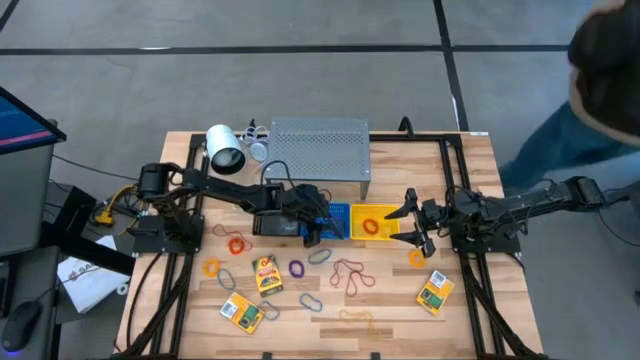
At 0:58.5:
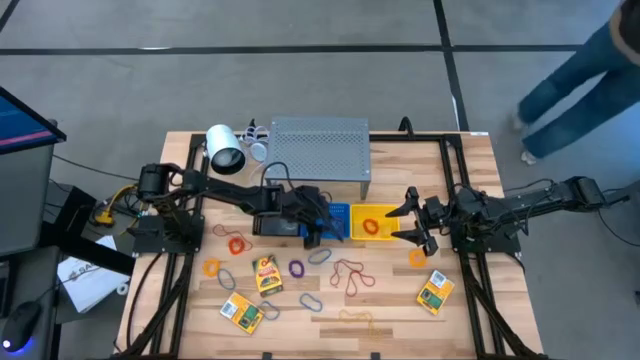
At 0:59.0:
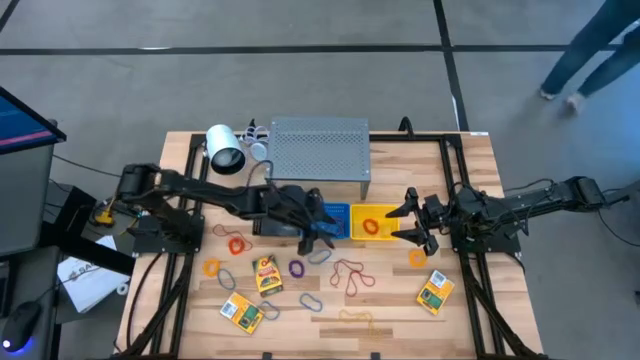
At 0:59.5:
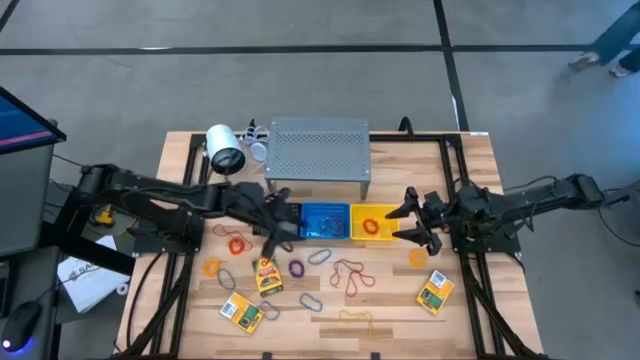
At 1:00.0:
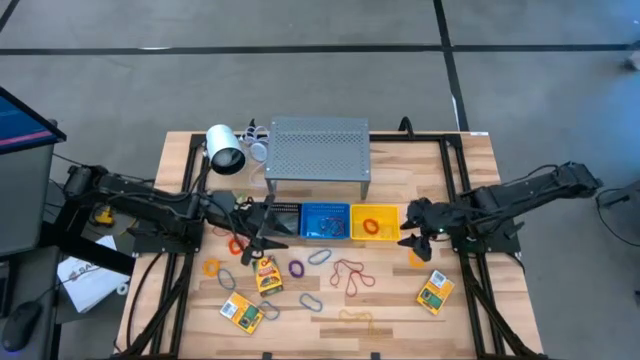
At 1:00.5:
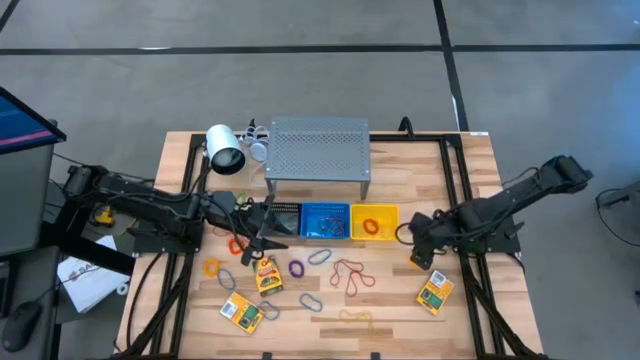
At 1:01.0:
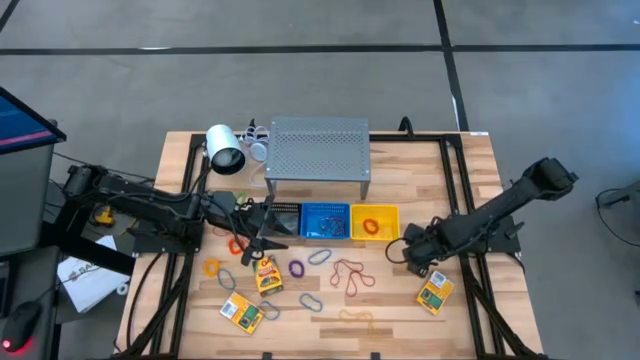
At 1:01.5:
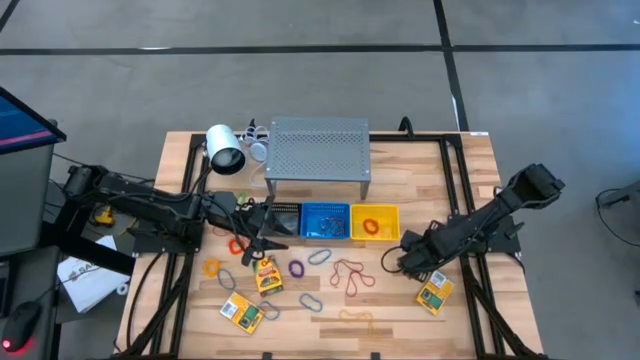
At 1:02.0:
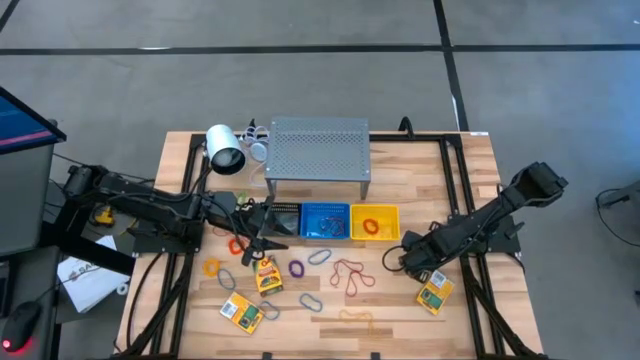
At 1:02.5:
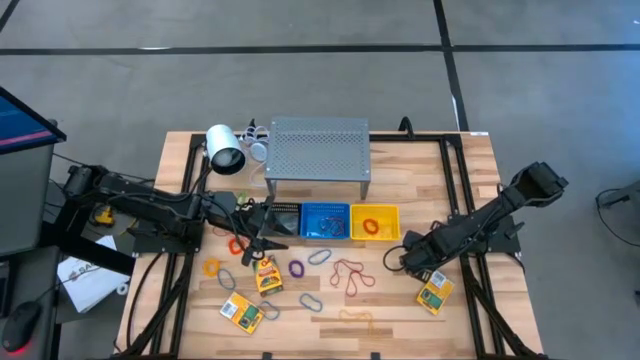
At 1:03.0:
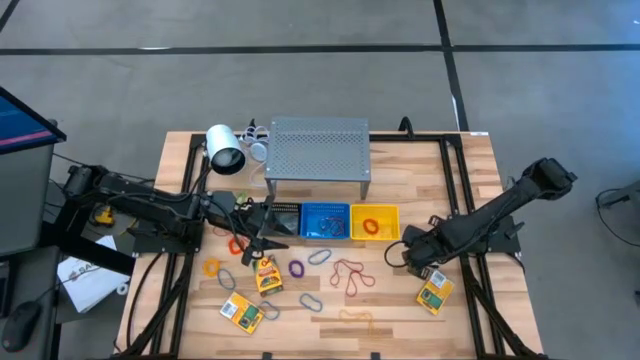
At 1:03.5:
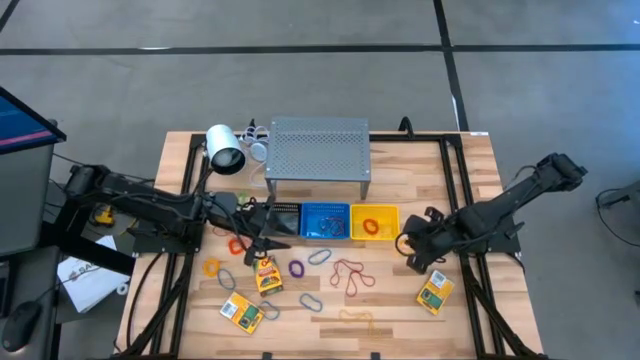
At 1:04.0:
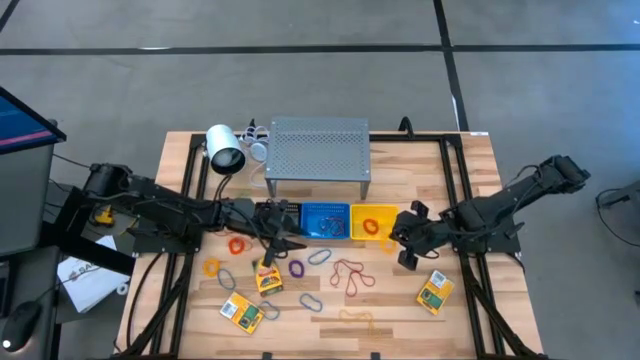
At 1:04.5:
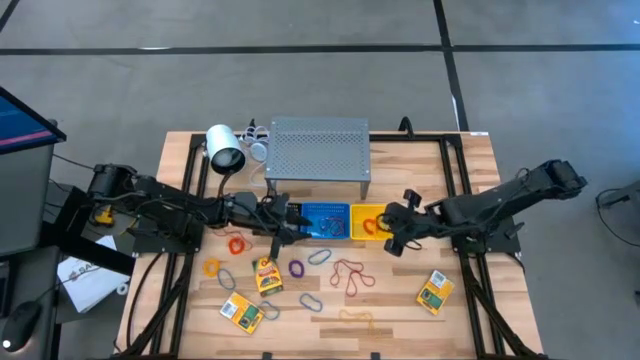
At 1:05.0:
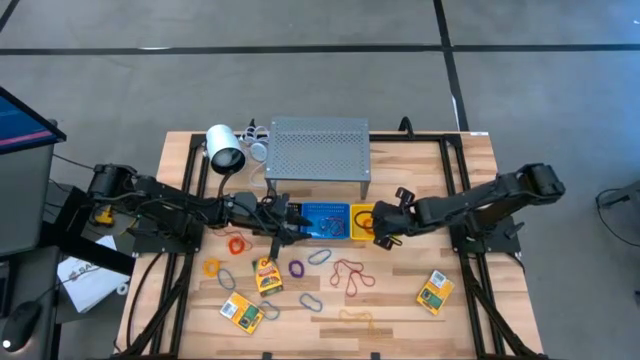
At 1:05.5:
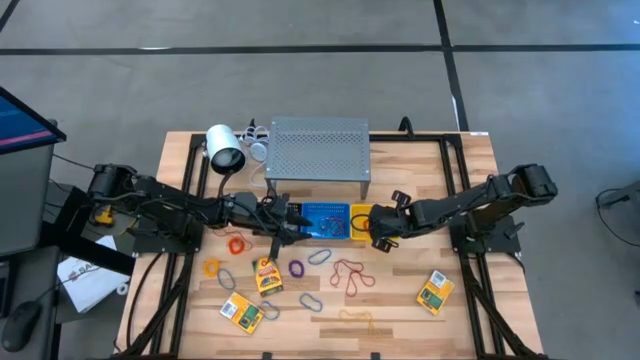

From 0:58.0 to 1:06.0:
Task: Pick & Place Office Desk Supplies
Put the right yellow spiral keychain into the yellow bin

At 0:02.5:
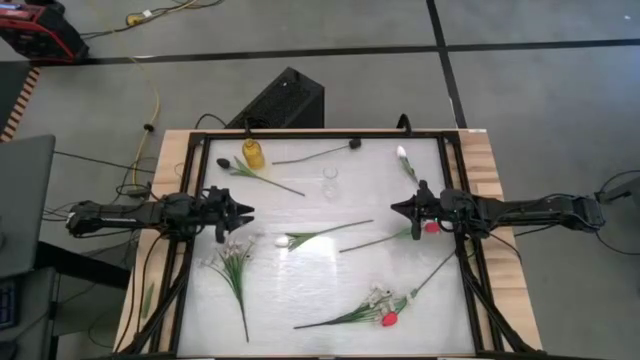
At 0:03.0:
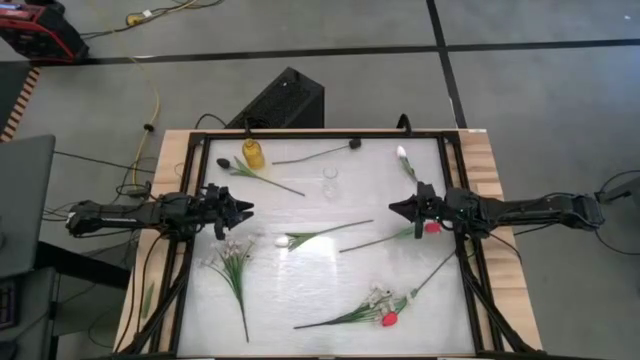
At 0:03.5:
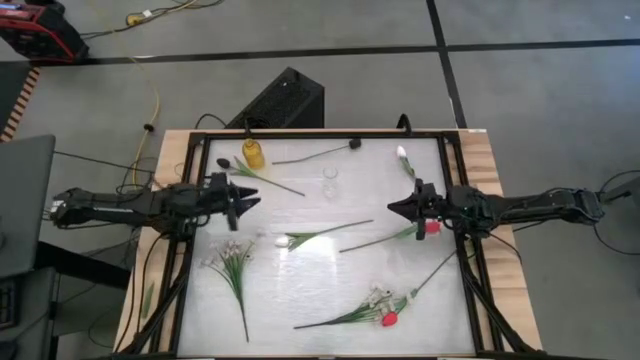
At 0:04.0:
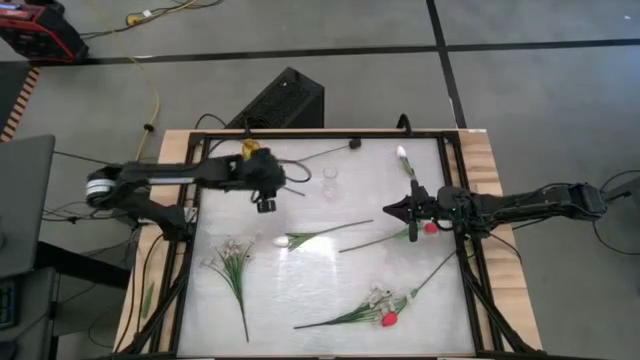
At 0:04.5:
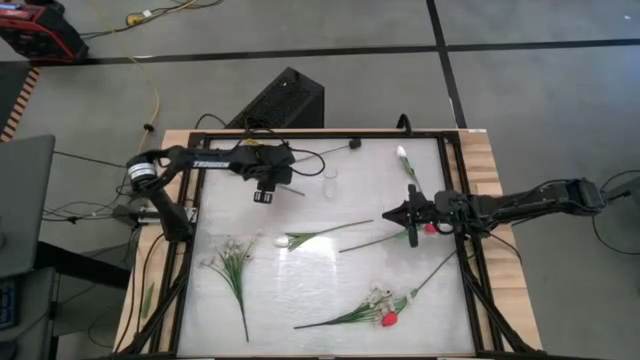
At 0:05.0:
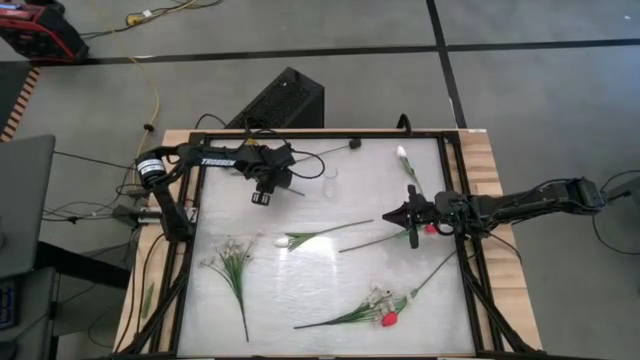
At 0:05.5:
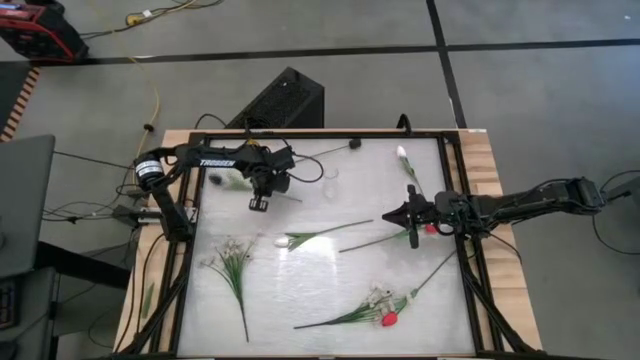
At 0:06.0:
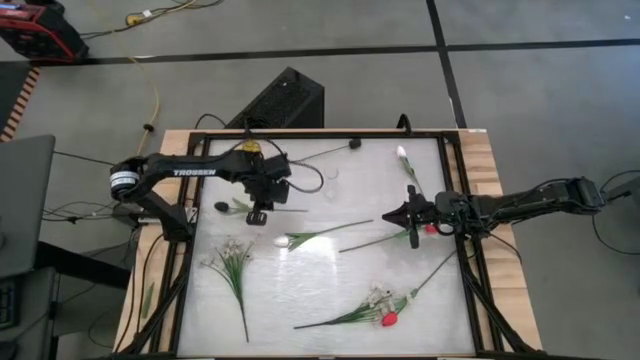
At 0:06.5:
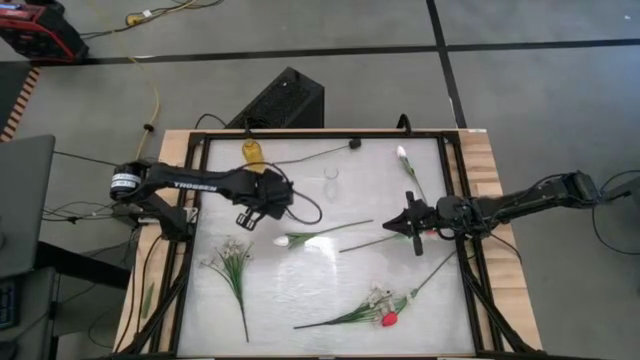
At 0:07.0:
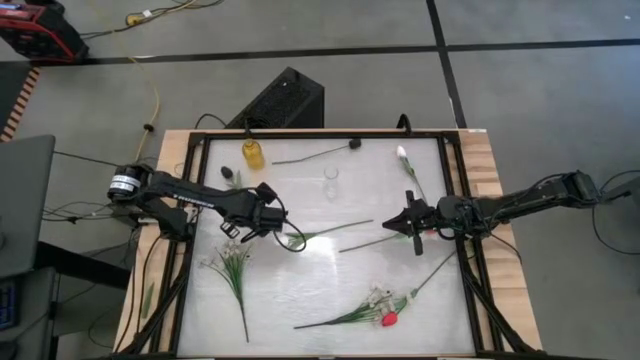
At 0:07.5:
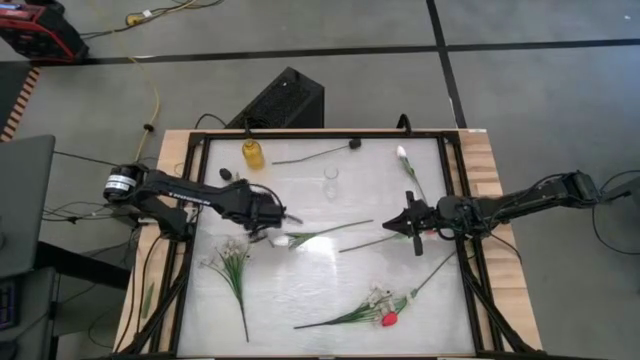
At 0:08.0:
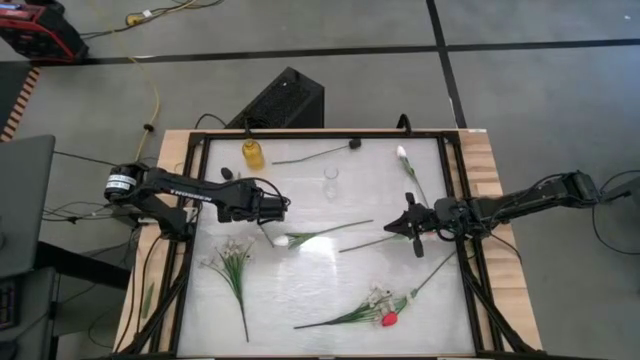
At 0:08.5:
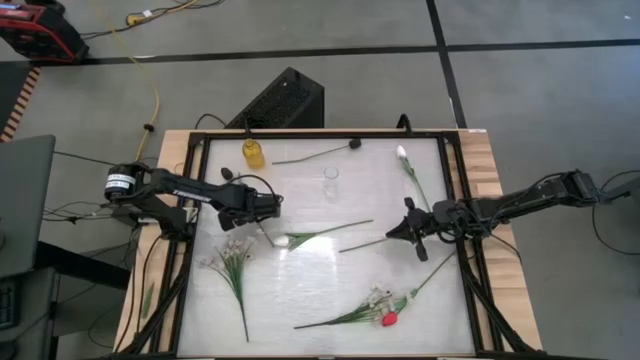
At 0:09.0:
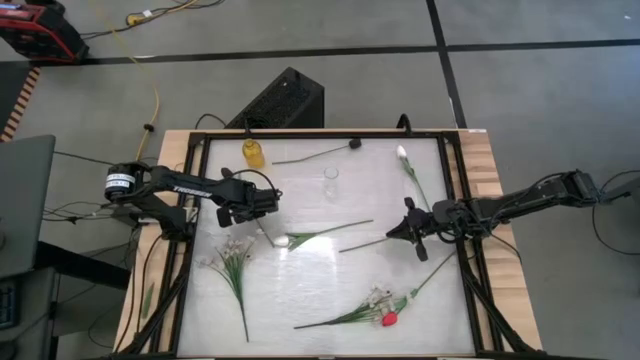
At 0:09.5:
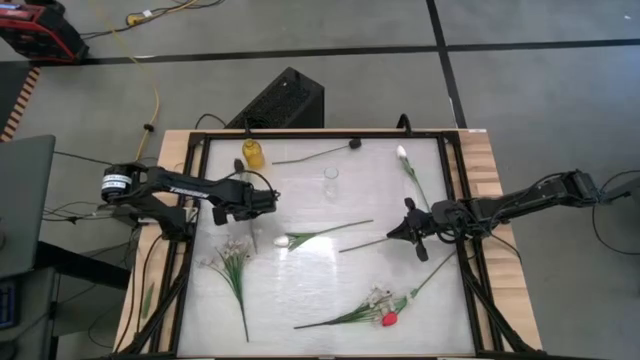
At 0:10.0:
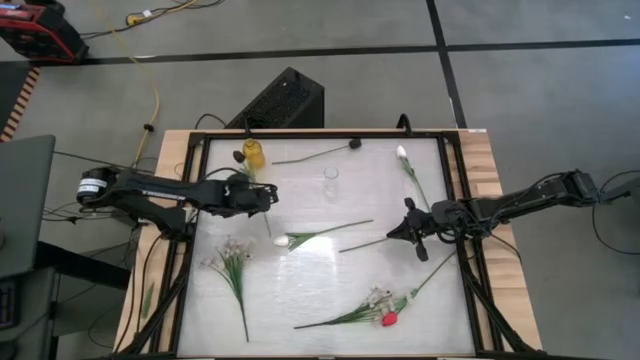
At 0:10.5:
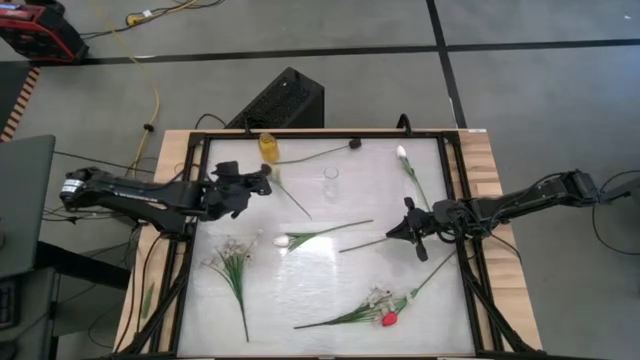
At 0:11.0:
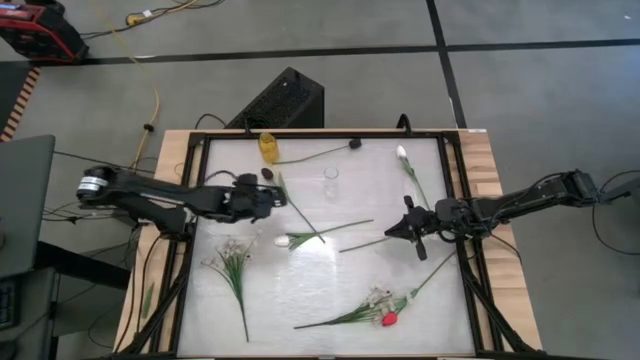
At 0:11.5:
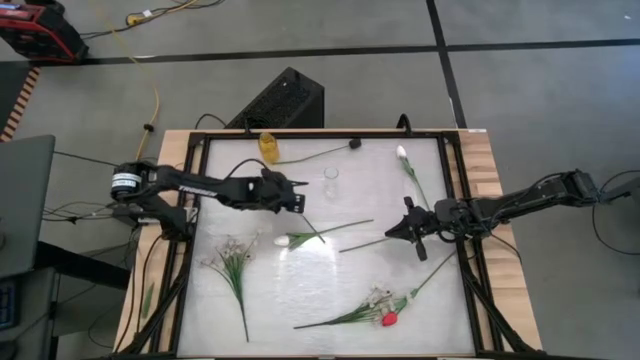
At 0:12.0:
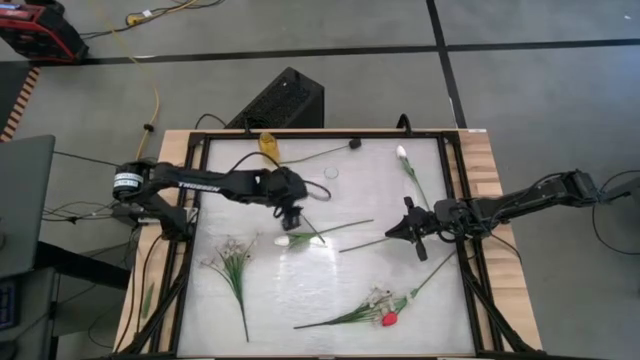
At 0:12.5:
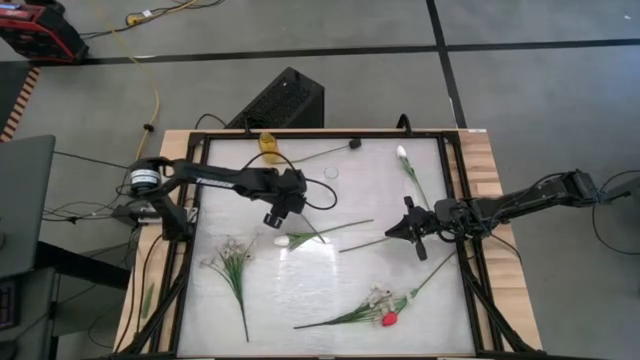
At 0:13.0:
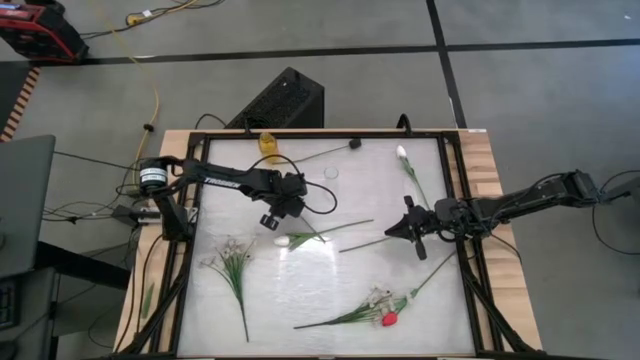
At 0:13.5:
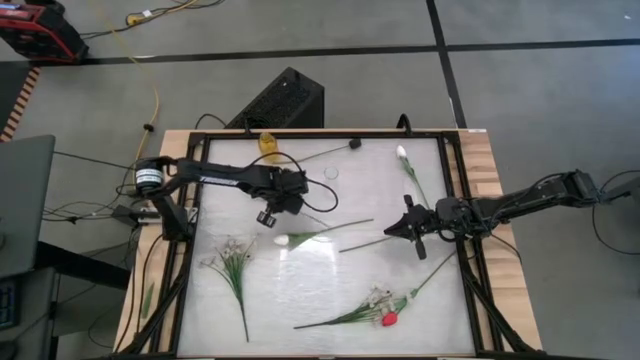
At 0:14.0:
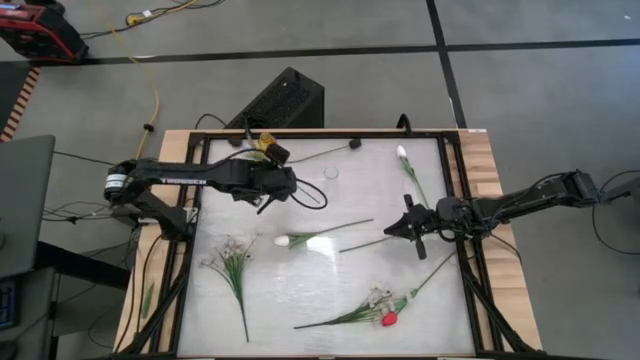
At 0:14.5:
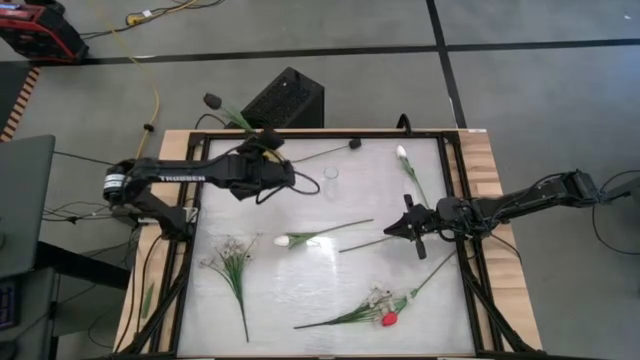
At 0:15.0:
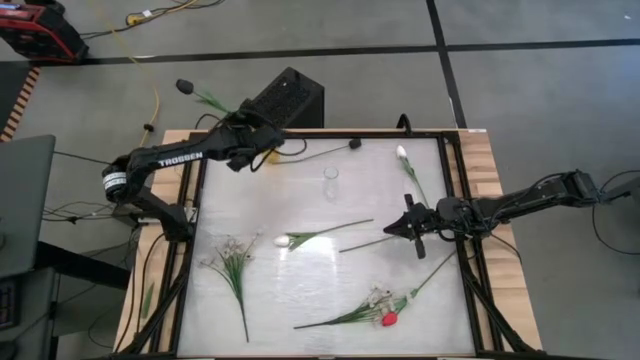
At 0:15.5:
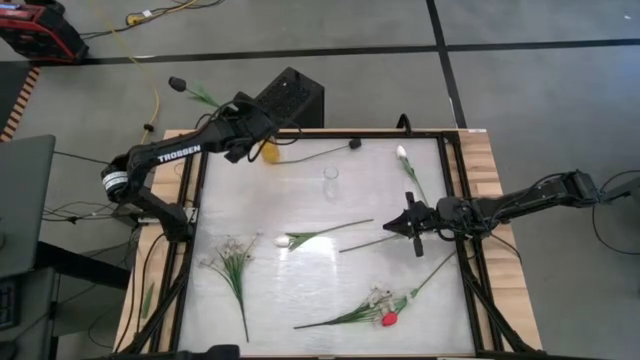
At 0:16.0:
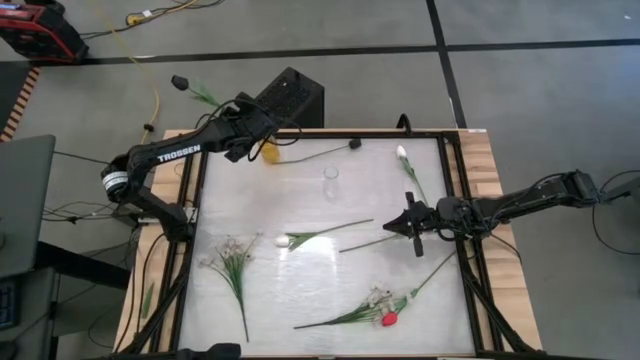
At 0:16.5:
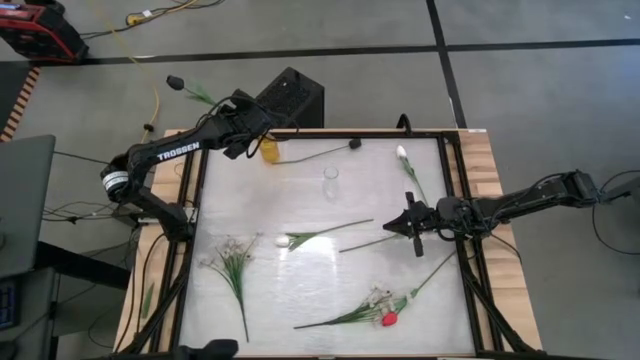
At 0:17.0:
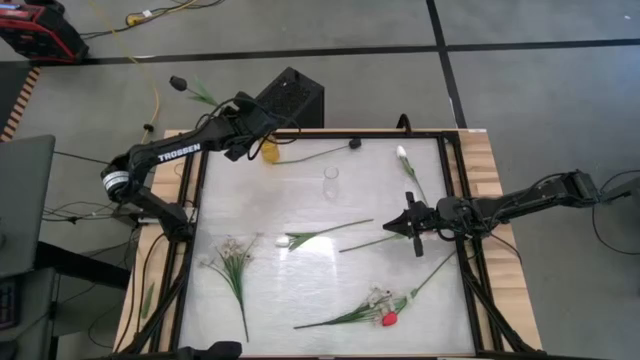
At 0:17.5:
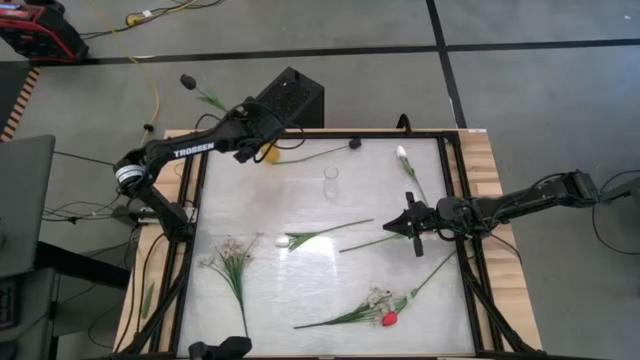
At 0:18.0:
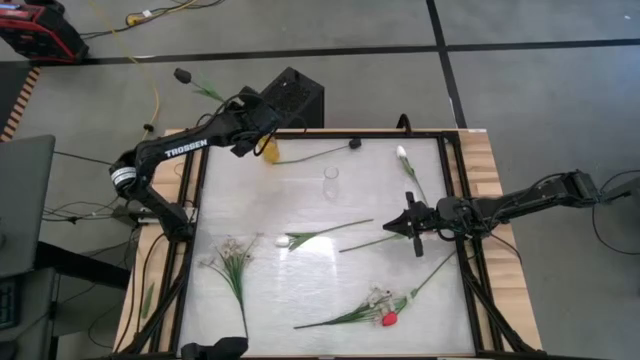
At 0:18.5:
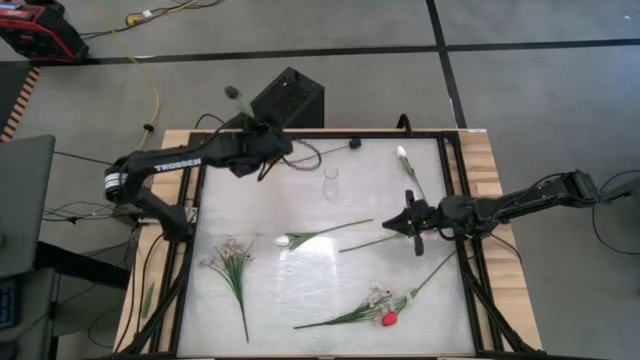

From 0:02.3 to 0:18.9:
Task: Sort flowers into vase by color
Put the bottom black flower into the yellow flower vase
